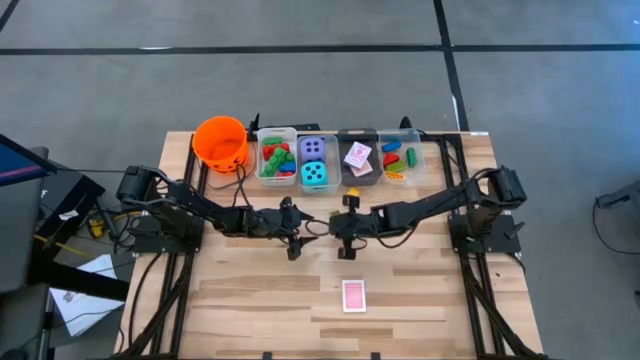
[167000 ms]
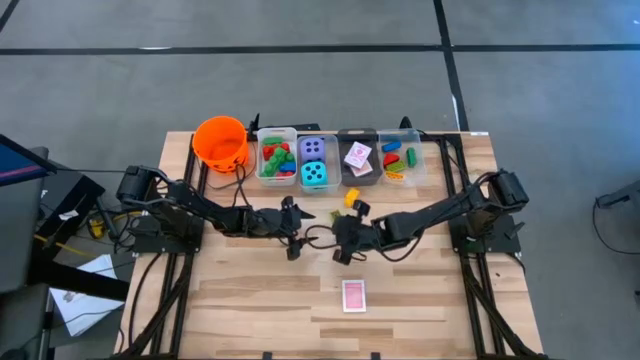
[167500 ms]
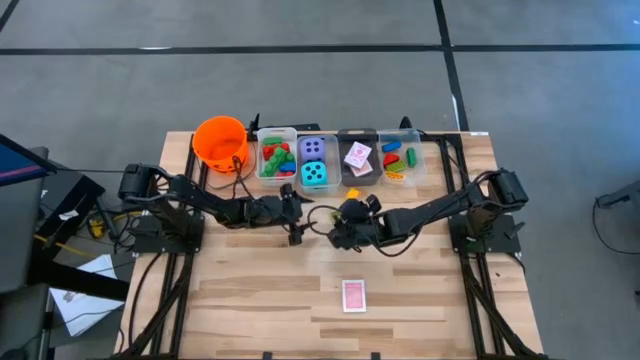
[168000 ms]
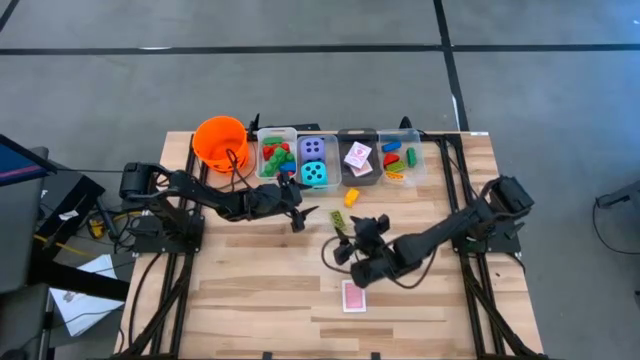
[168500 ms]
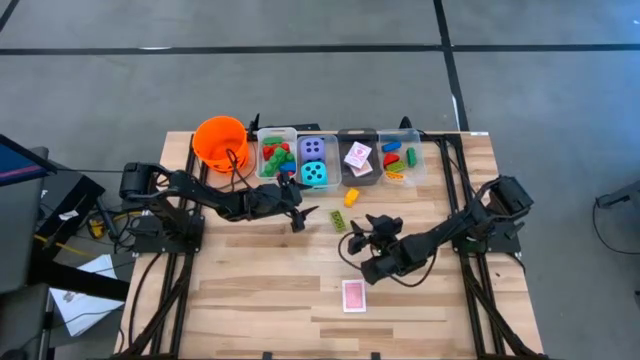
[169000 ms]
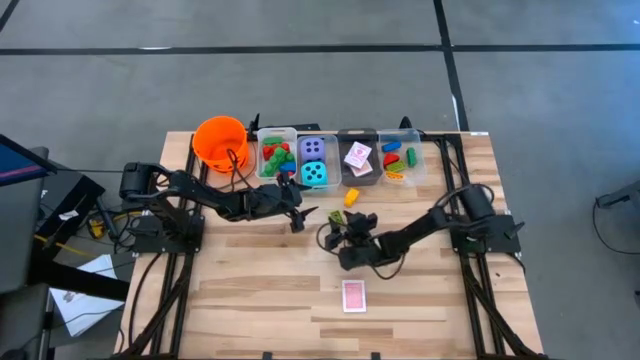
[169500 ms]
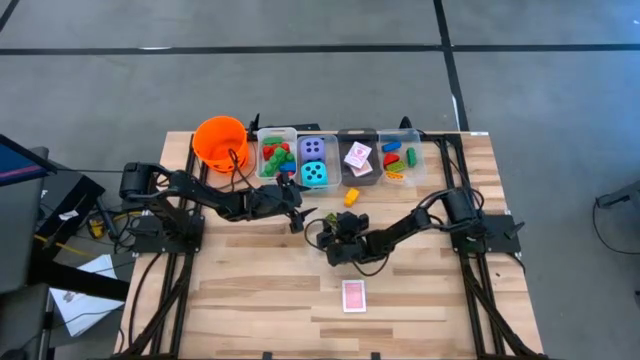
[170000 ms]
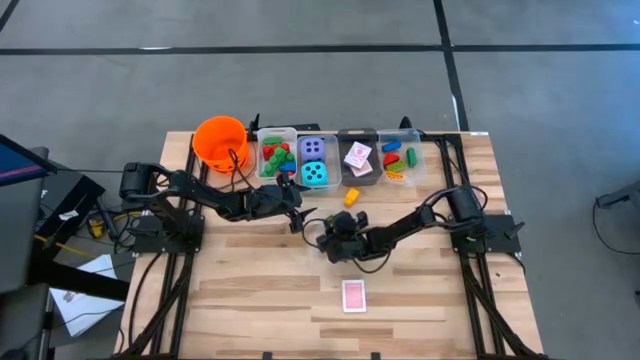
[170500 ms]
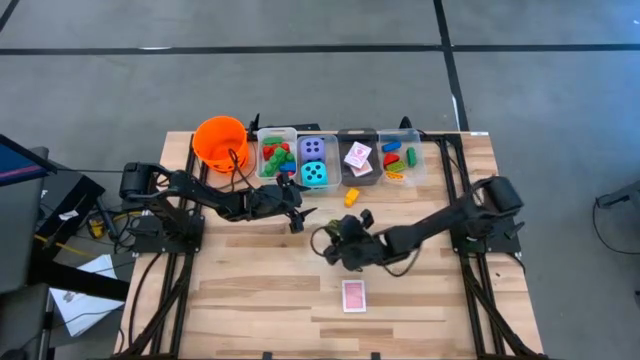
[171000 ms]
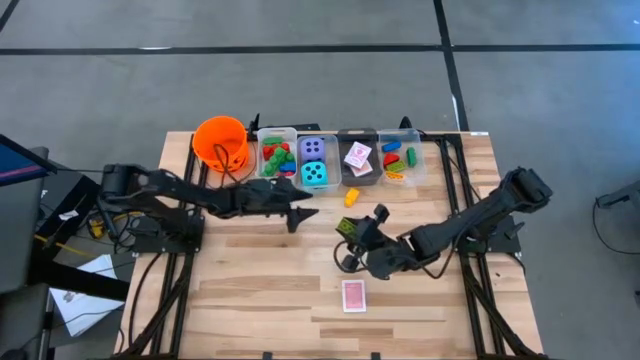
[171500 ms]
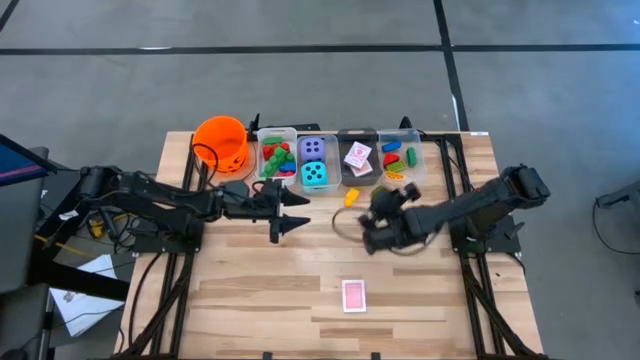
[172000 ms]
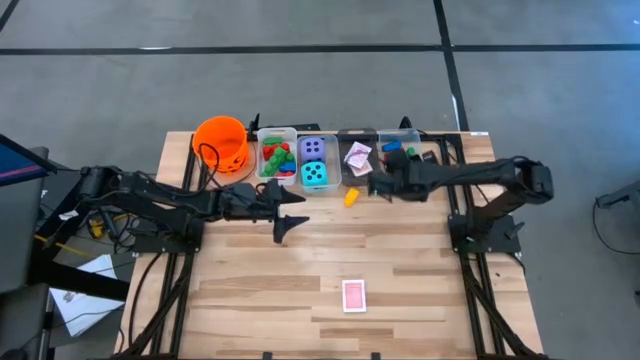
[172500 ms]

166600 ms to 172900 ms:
Task: Pick & Place Toys
Put the small light green game piece into the right transparent bin

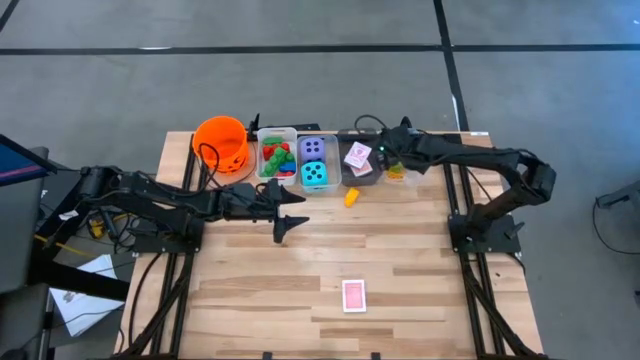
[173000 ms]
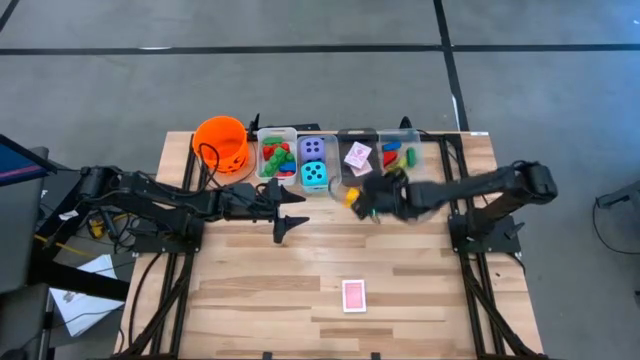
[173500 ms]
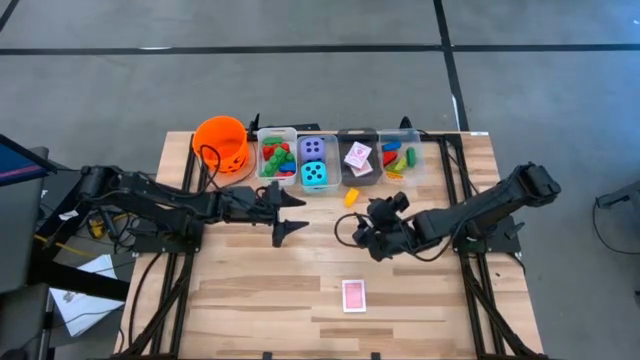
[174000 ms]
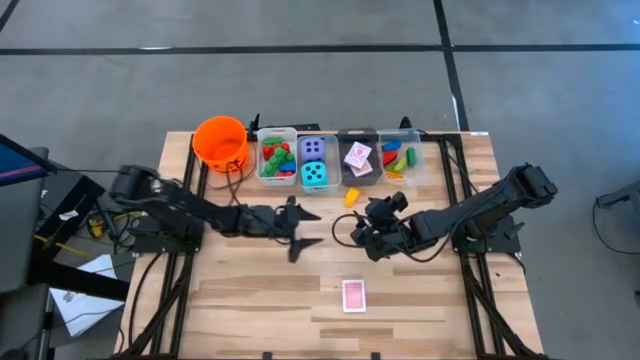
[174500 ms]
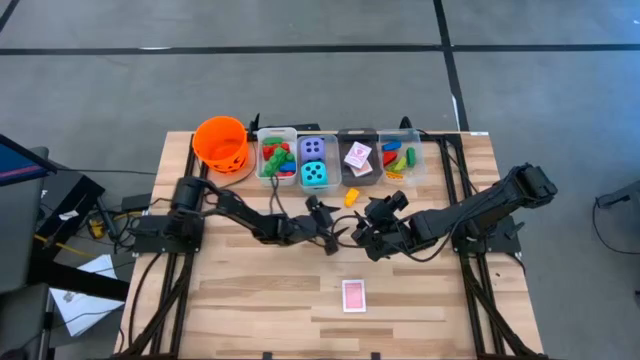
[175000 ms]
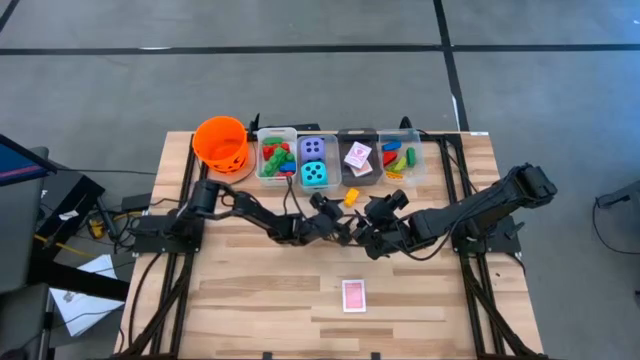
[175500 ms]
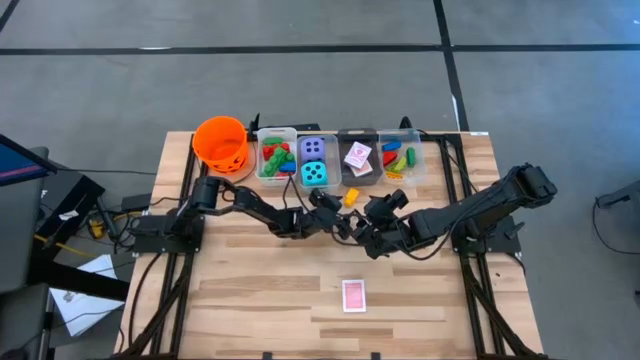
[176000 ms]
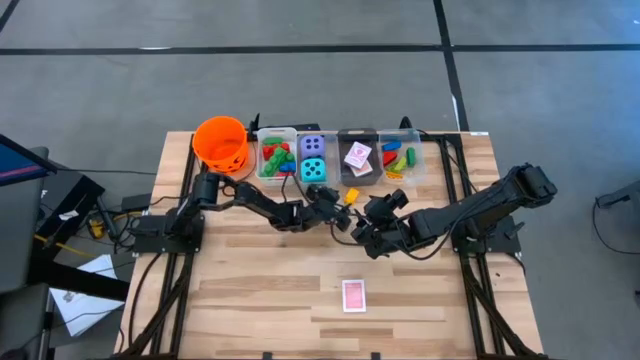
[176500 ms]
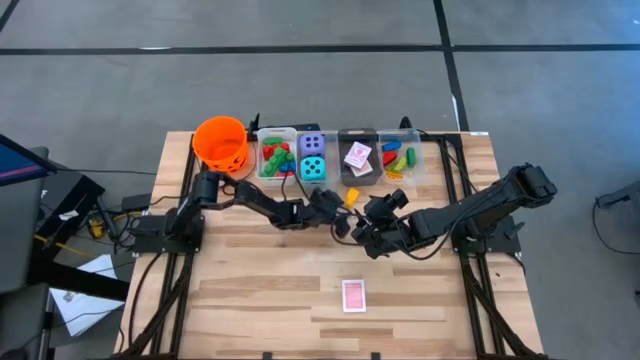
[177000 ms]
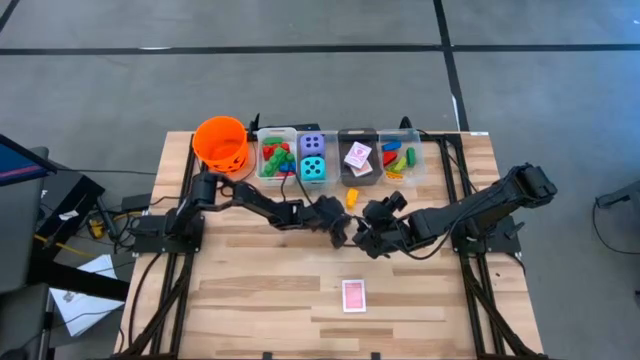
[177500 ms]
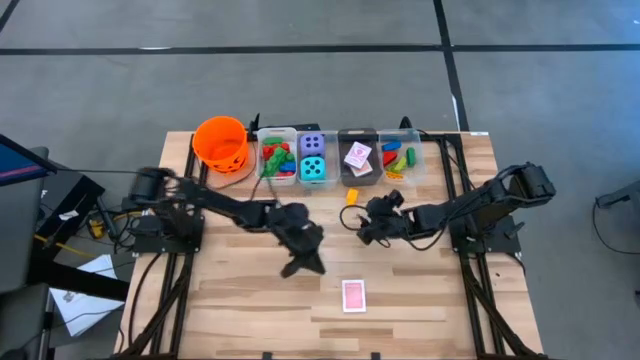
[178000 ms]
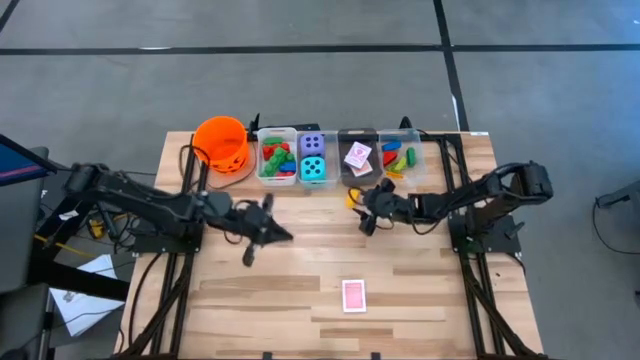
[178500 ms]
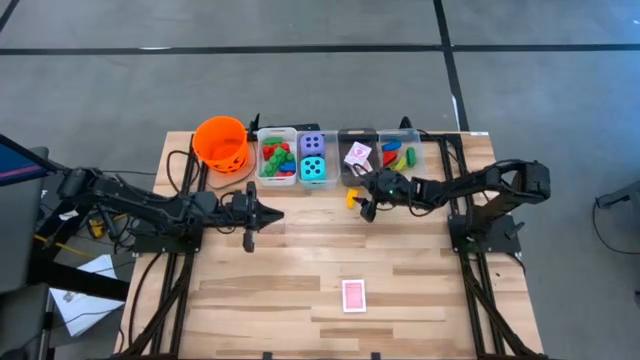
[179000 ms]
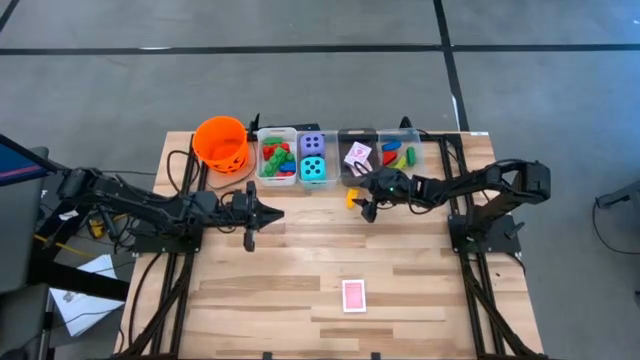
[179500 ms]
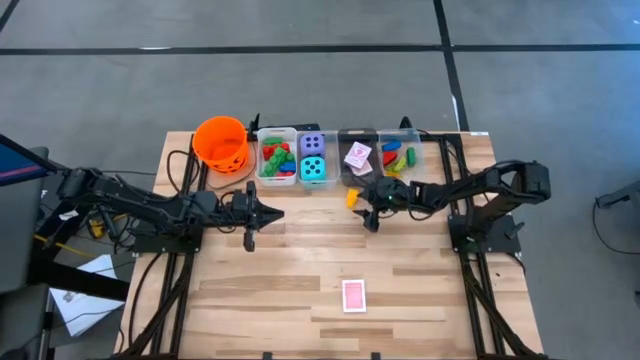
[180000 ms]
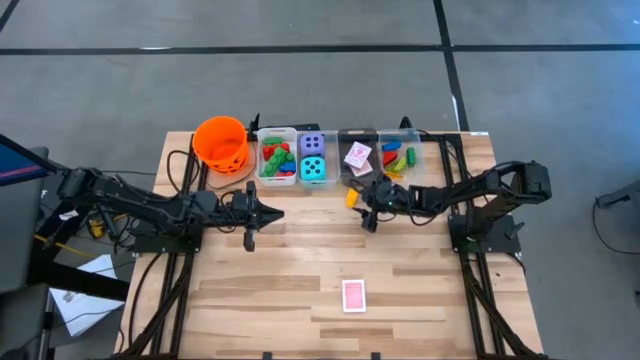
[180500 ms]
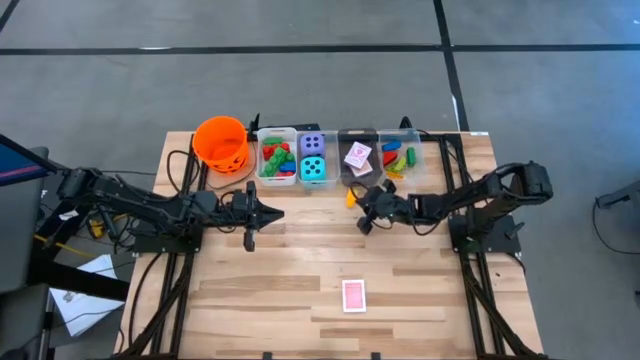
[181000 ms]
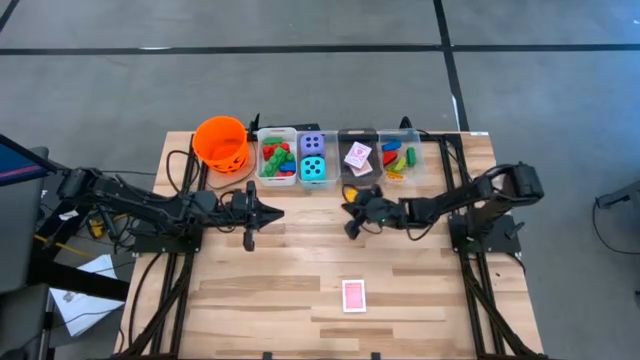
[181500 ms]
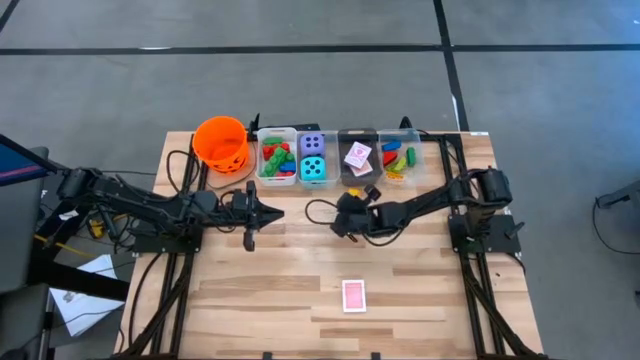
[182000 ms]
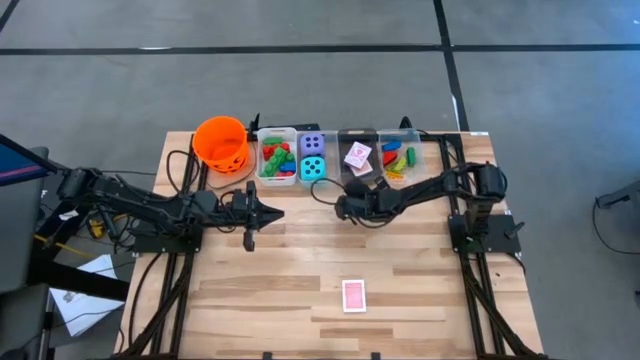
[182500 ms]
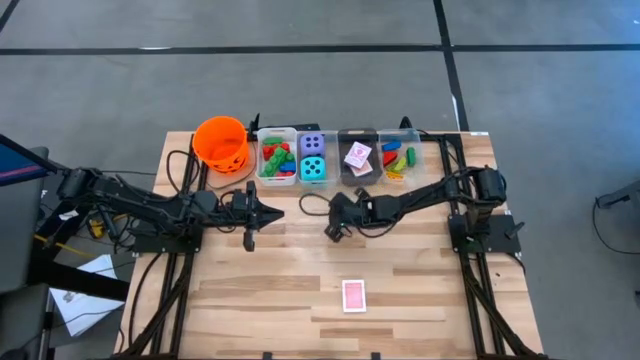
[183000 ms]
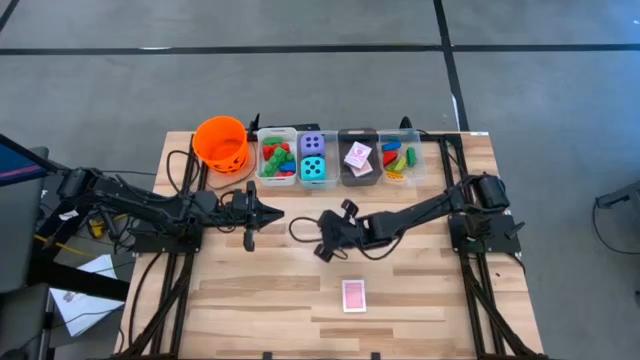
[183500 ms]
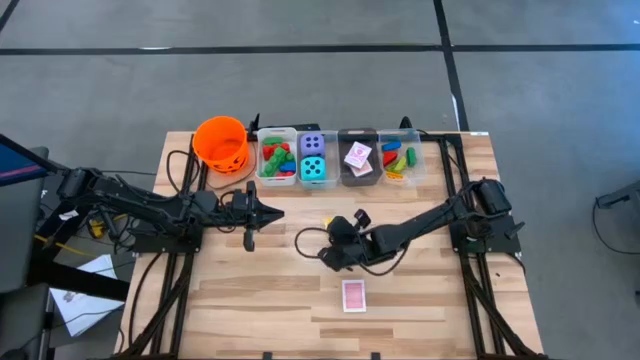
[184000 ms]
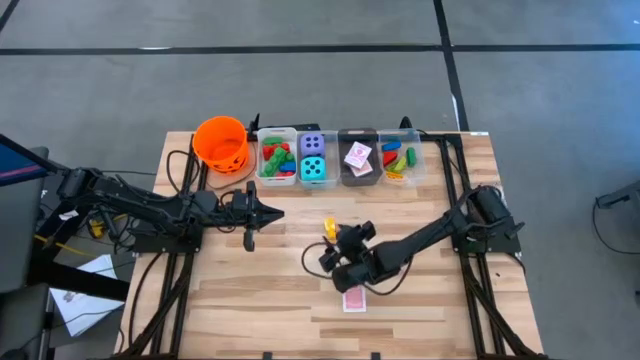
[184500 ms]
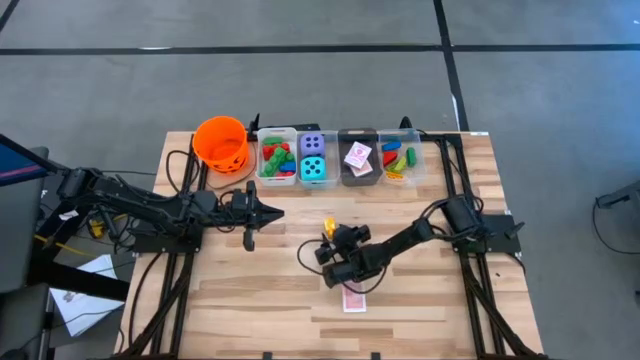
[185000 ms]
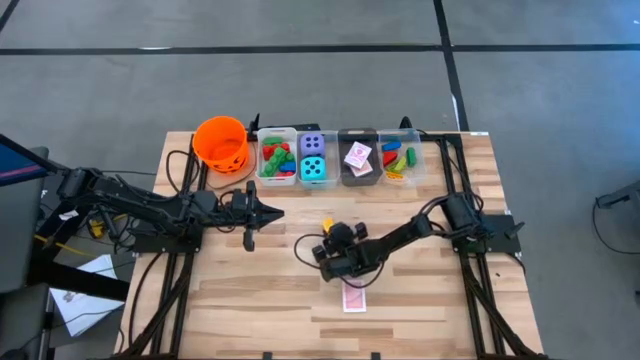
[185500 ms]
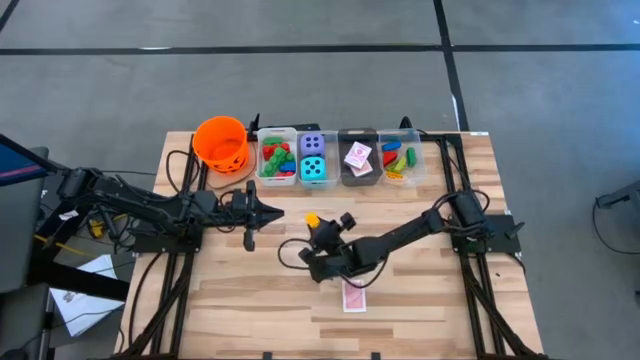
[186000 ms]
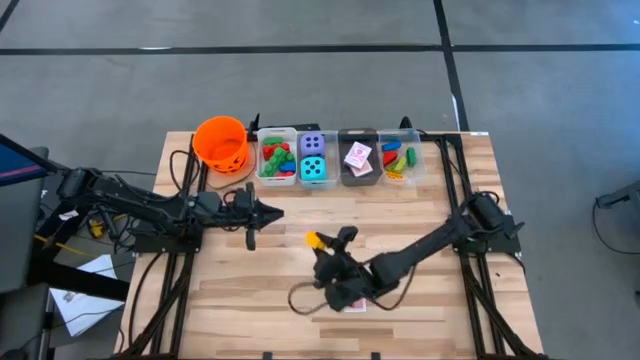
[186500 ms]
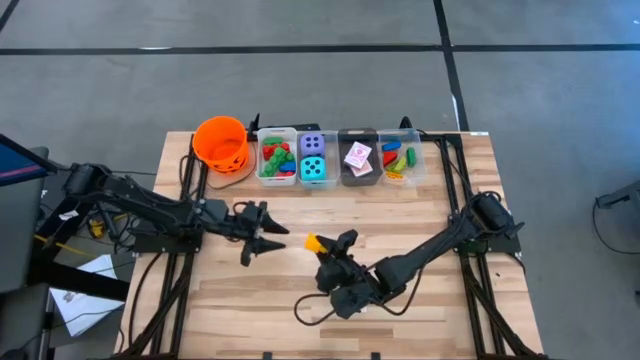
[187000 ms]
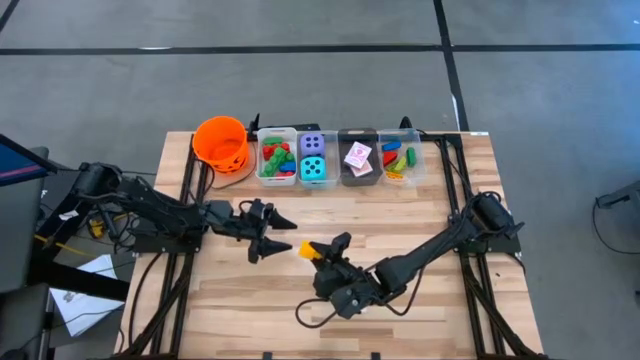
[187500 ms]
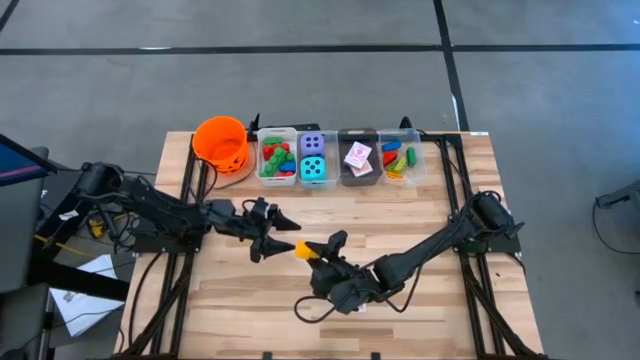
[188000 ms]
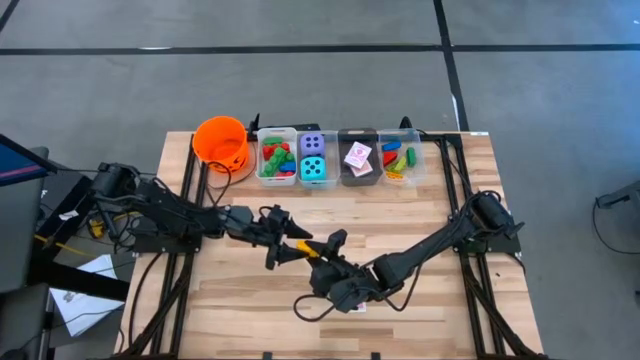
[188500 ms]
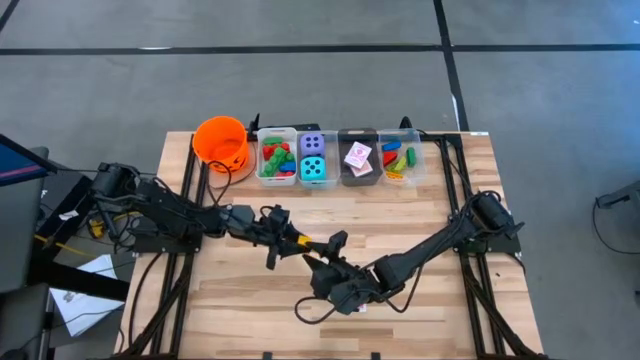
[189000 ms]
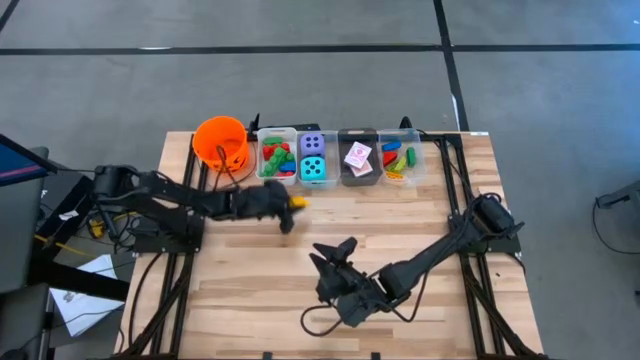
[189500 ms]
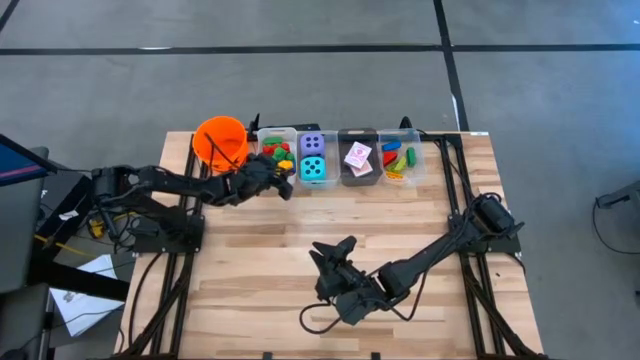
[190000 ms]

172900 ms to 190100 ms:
Put the big yellow game piece into the white bin
